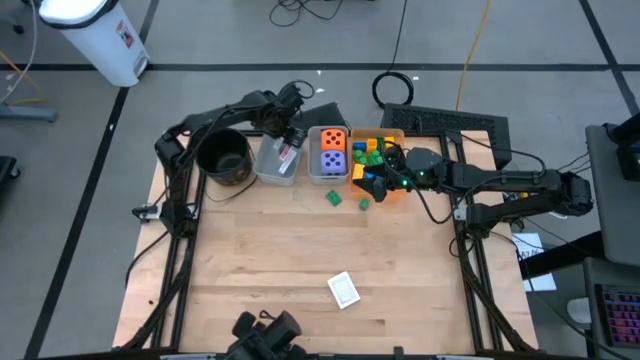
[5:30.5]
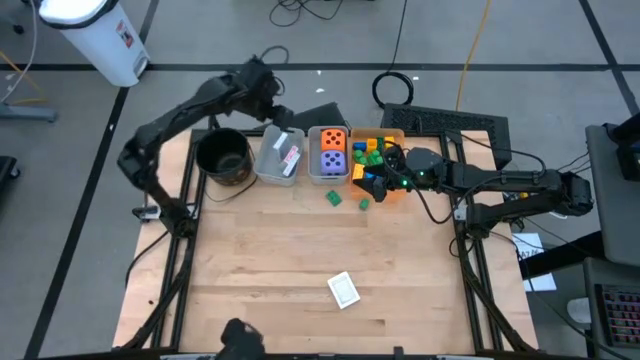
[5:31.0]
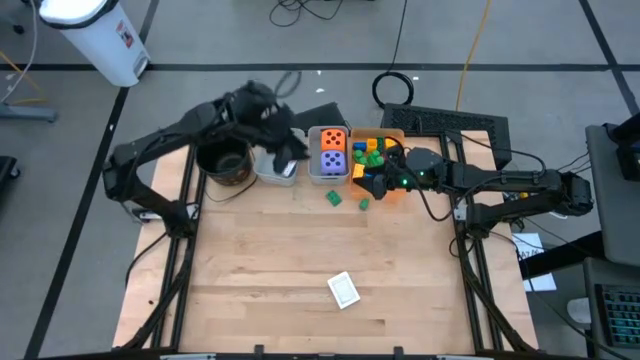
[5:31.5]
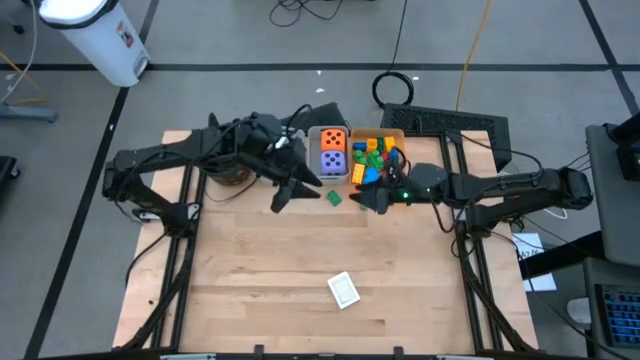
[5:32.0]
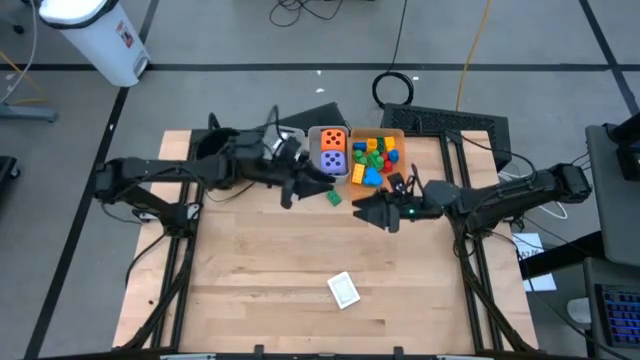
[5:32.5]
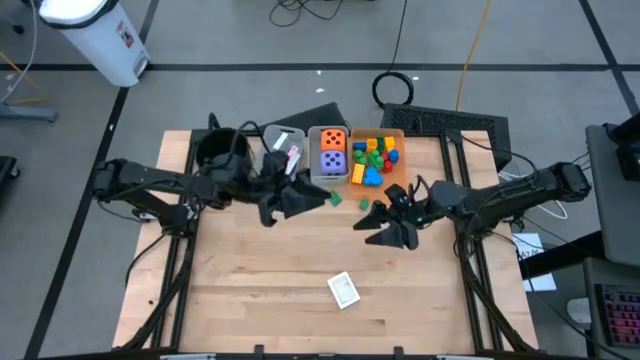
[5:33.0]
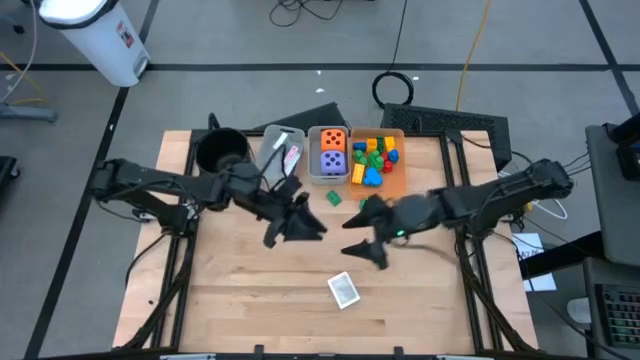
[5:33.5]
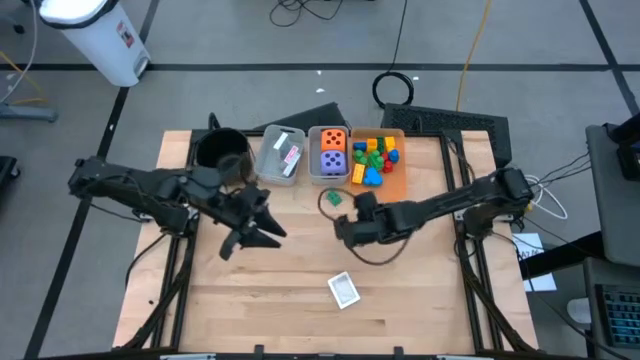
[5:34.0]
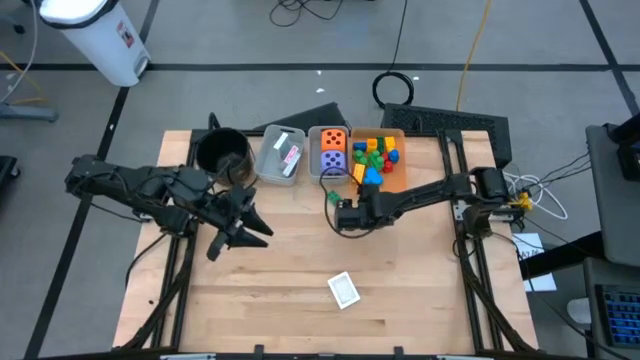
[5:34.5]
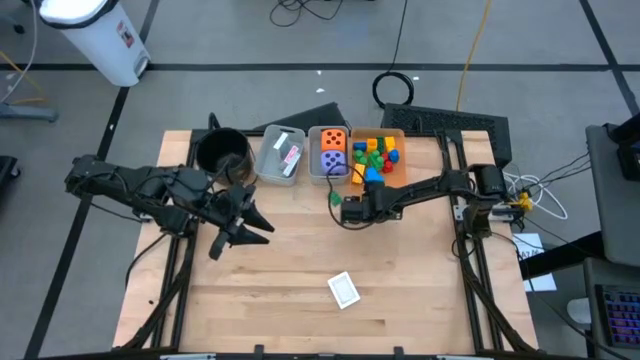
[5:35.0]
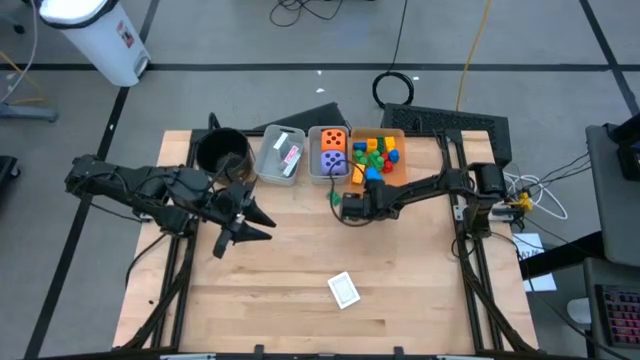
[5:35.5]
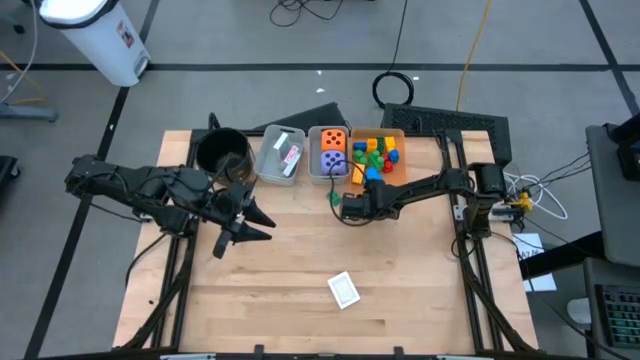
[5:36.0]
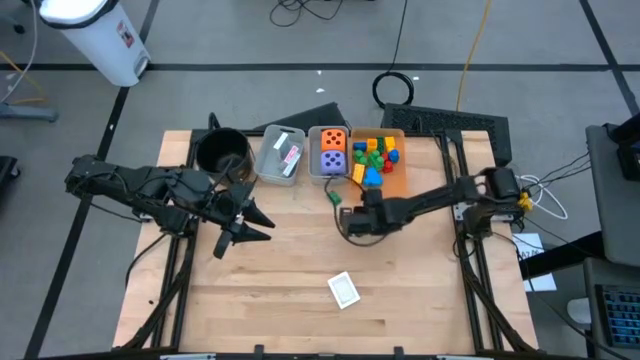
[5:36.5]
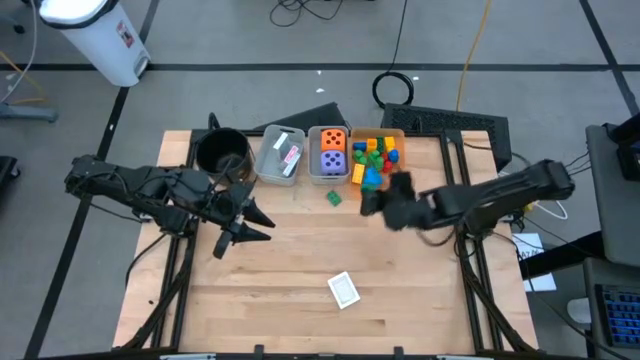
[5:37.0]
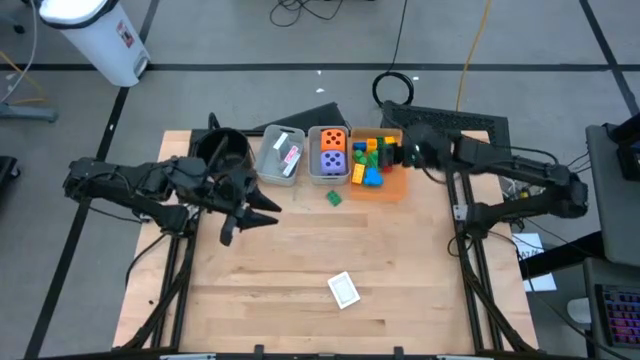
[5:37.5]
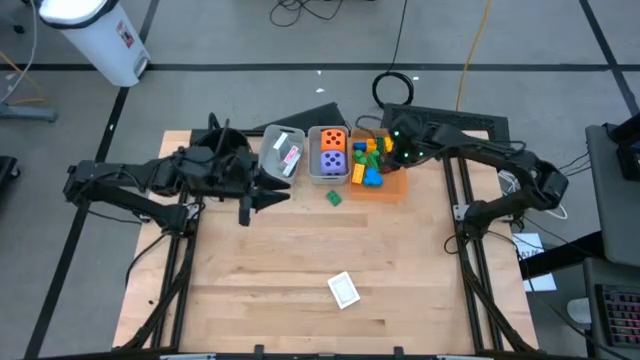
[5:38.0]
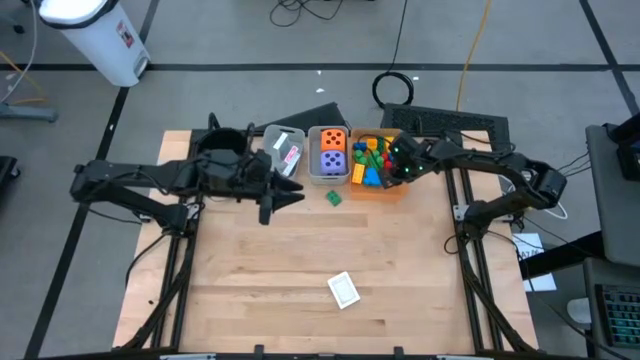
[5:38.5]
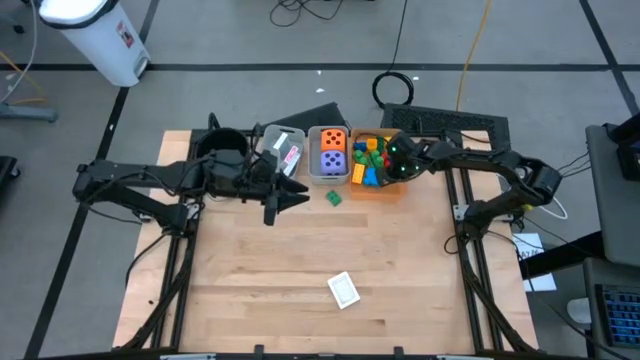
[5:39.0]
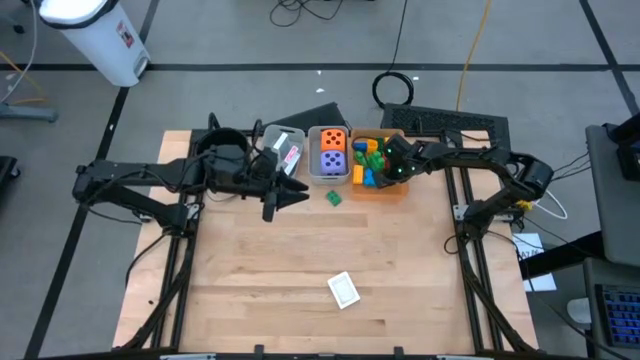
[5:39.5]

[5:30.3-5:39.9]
Task: Pick & Place Toys
Put the right green game piece into the orange bin

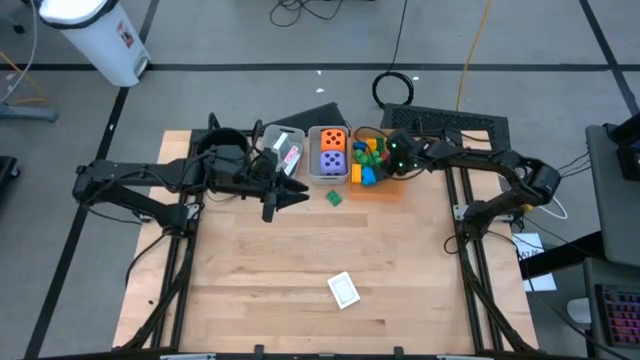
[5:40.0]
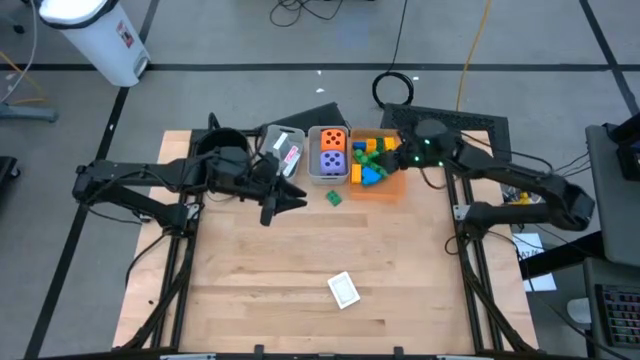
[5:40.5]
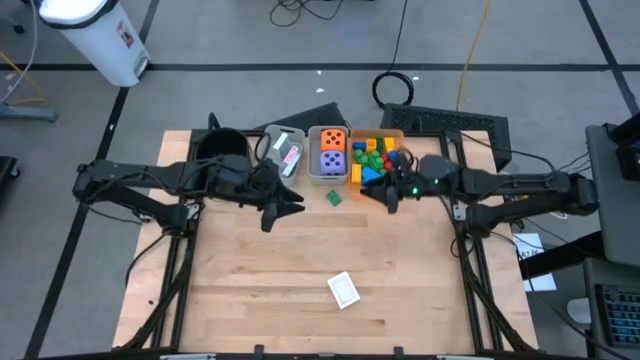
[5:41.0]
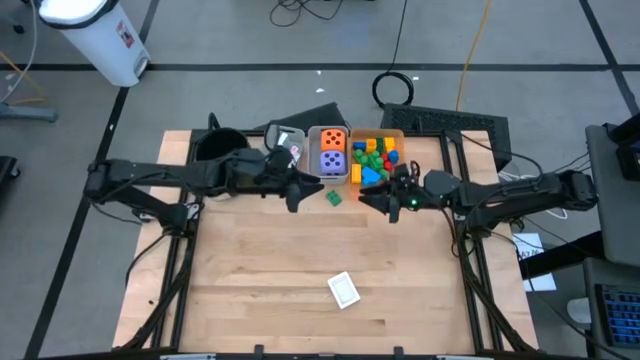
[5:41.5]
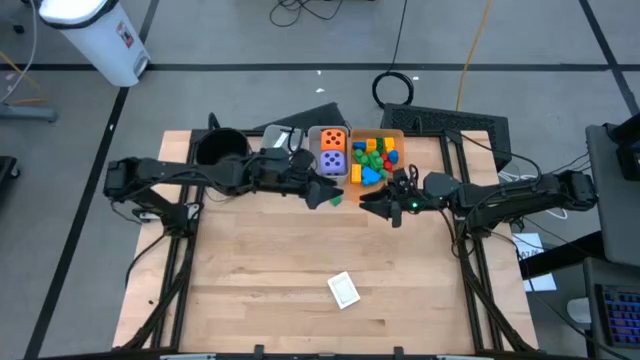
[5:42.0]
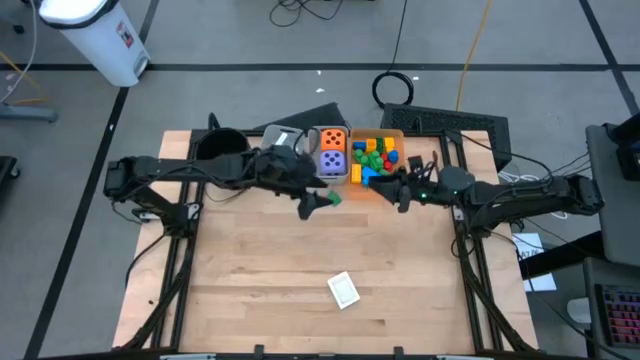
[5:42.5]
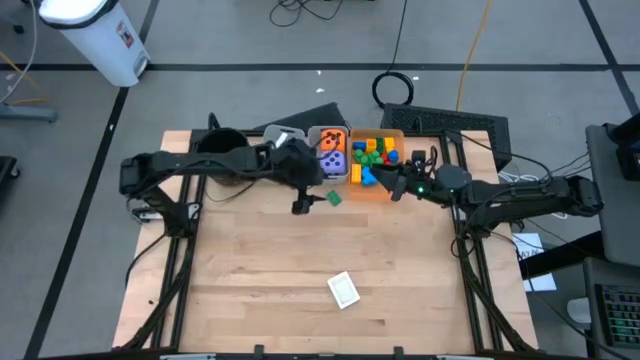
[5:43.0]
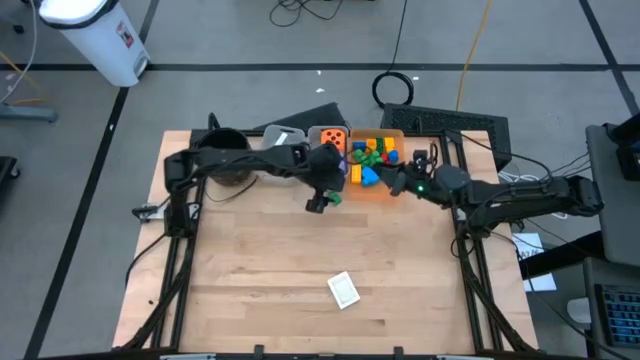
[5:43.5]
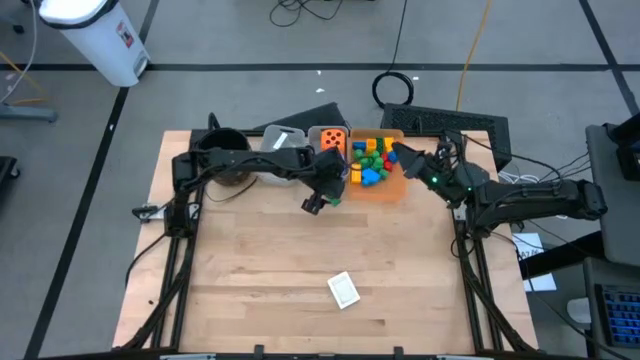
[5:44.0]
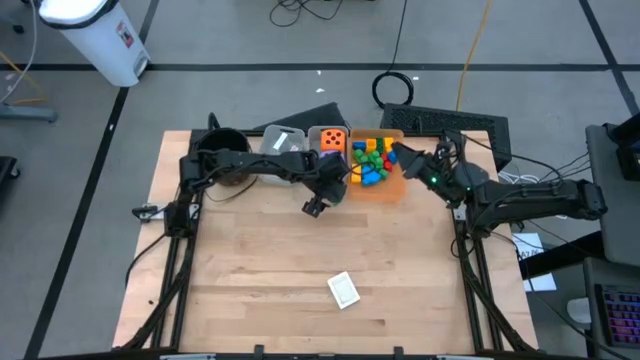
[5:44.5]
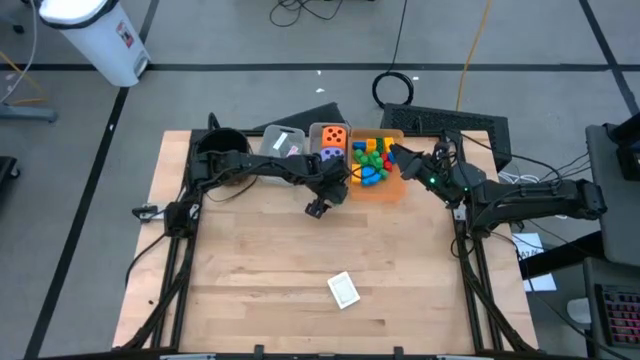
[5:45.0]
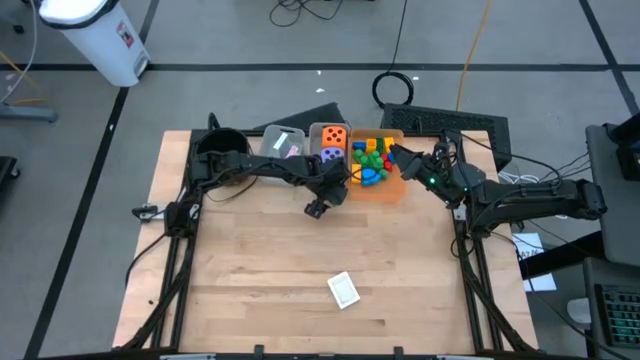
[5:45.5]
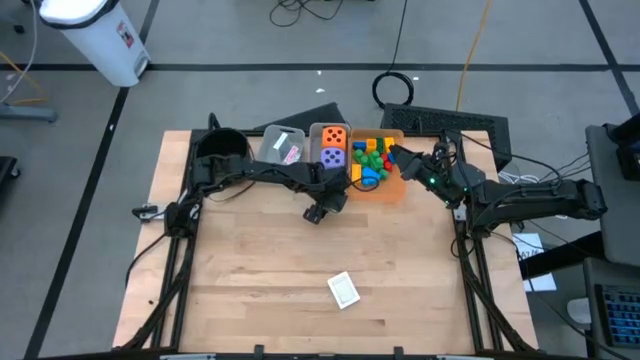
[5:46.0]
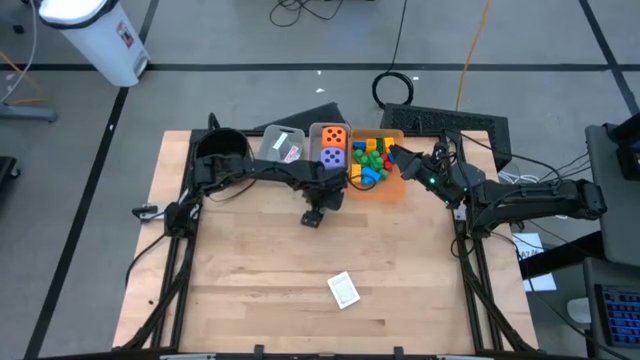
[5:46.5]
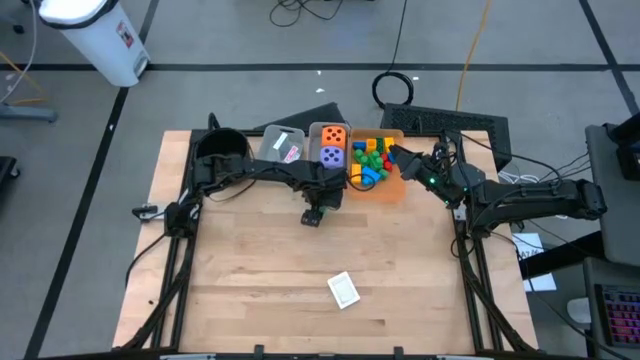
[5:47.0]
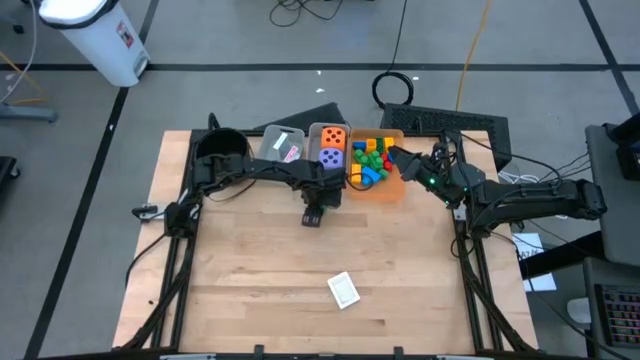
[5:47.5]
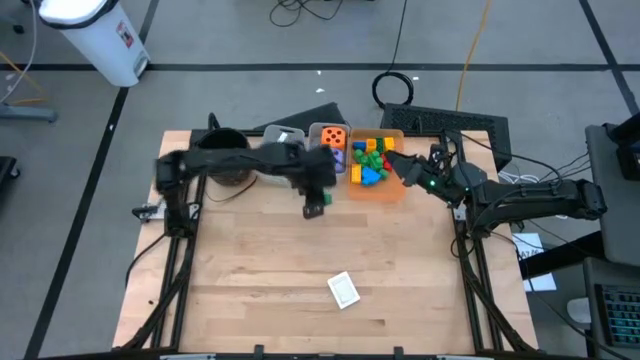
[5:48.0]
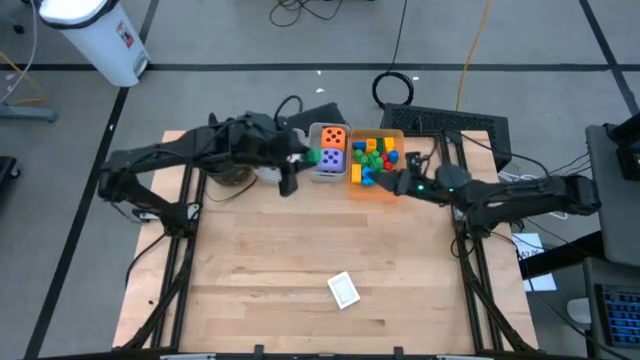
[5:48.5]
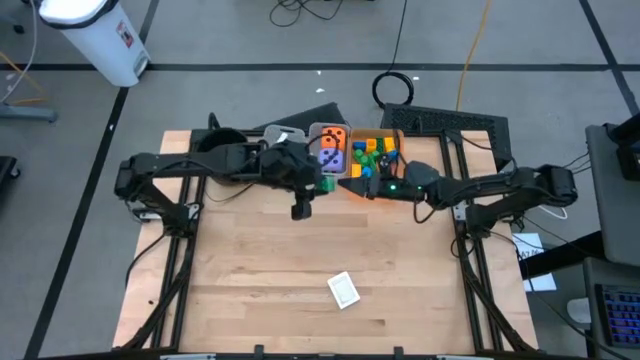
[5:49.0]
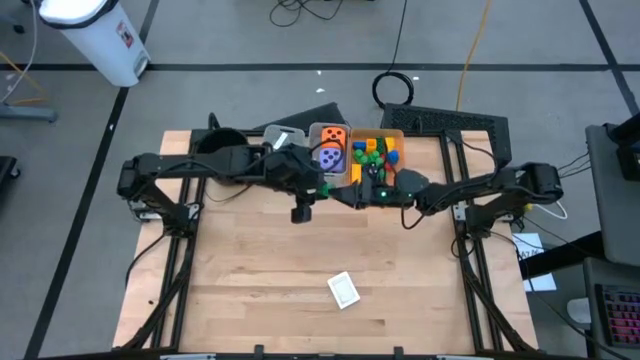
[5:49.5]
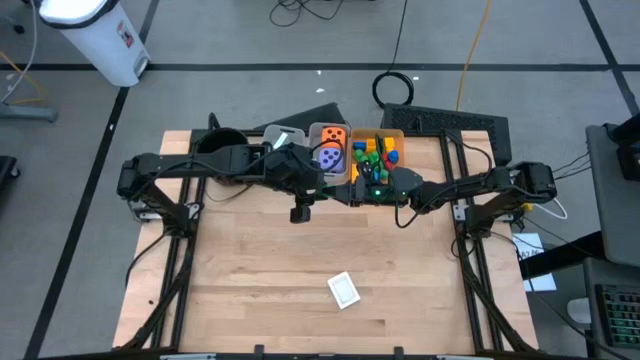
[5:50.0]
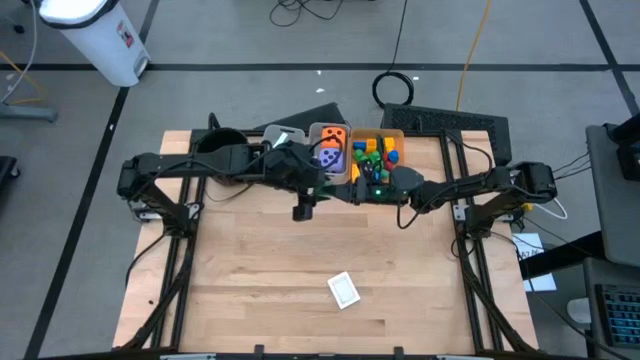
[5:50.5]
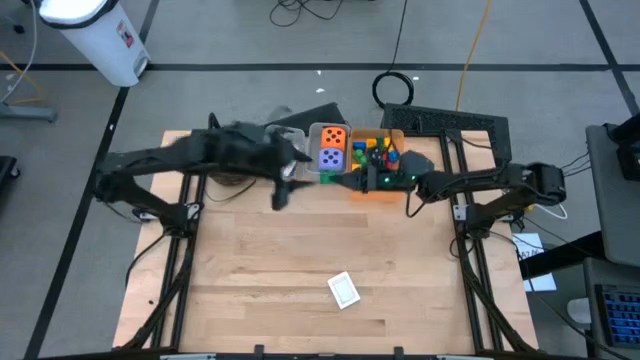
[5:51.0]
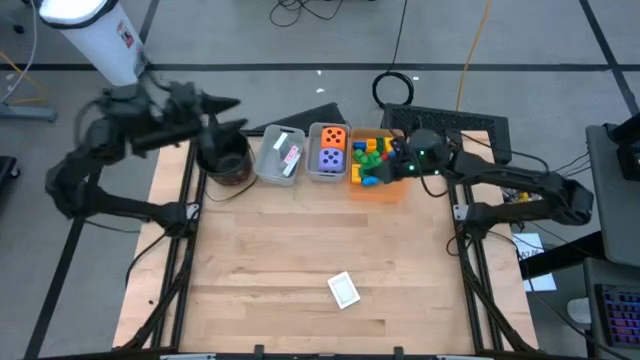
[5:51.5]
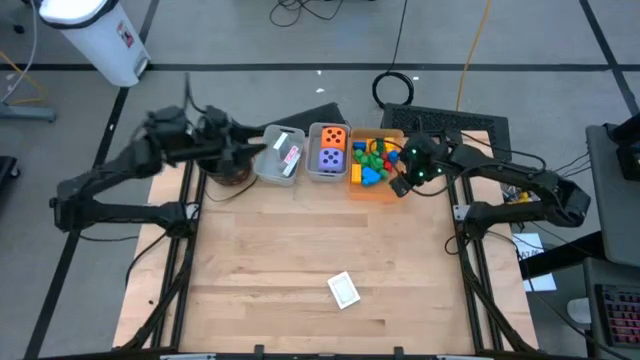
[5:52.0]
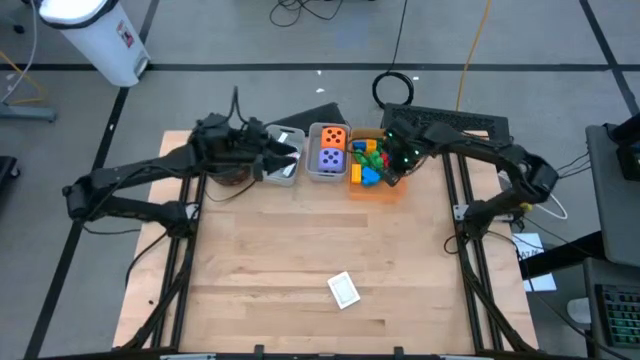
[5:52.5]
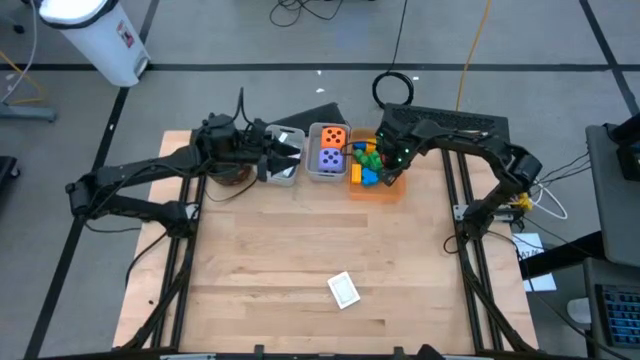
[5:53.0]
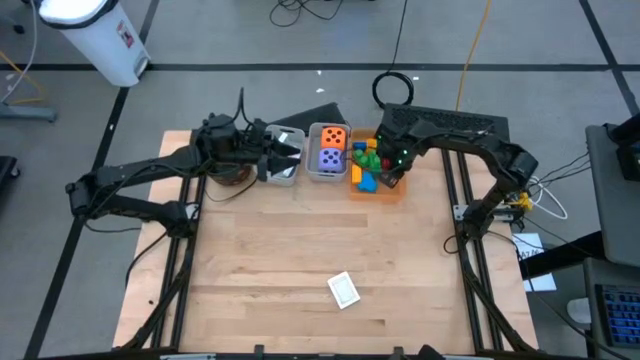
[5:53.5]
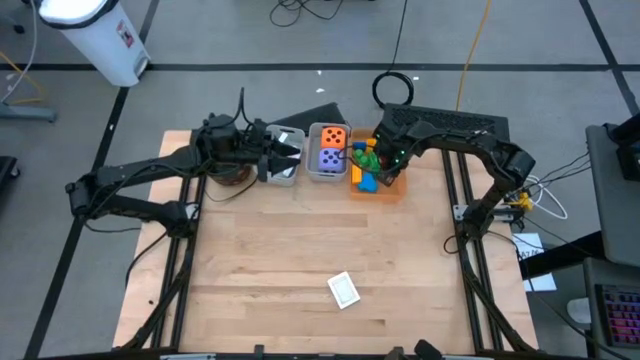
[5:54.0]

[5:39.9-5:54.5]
Put the green game piece into the orange bin
